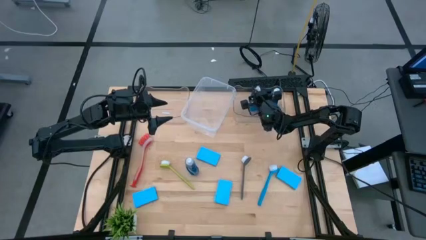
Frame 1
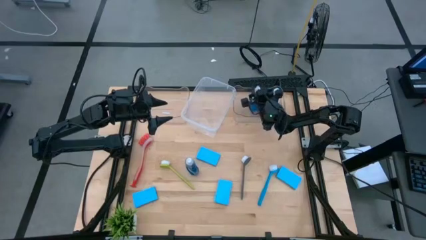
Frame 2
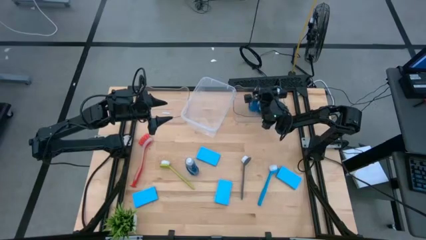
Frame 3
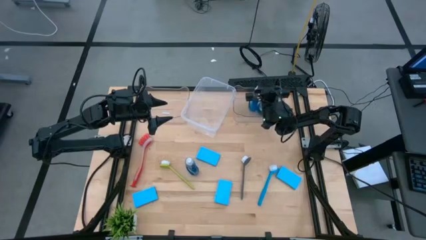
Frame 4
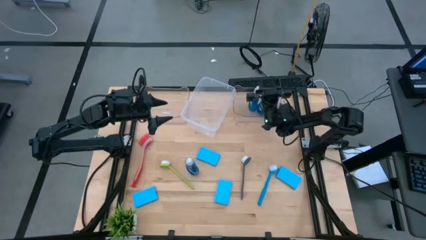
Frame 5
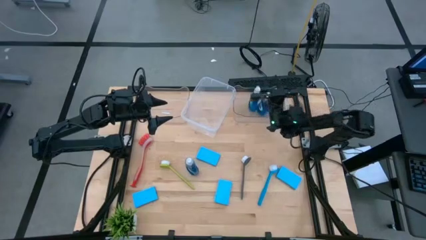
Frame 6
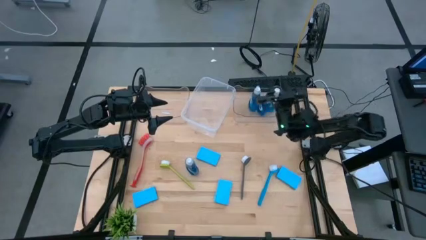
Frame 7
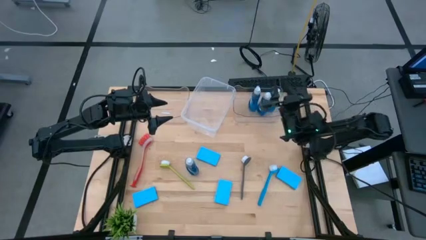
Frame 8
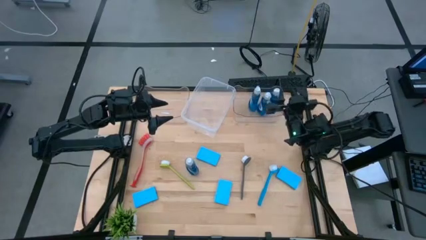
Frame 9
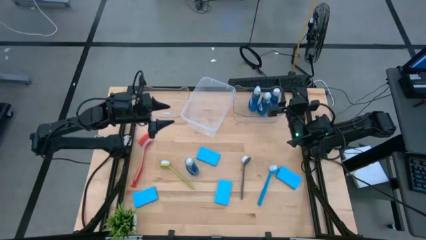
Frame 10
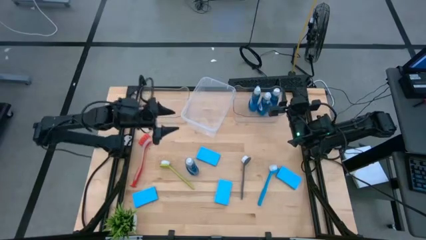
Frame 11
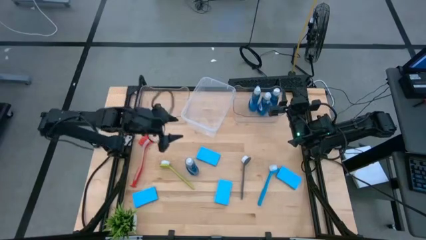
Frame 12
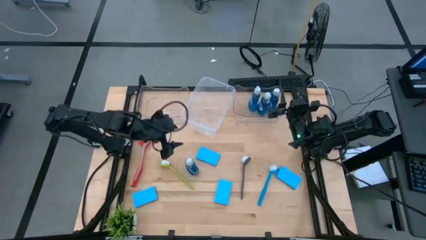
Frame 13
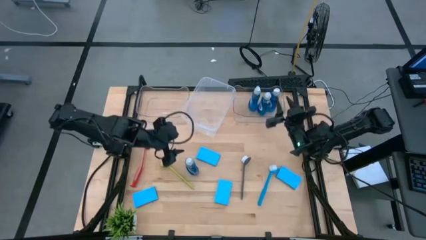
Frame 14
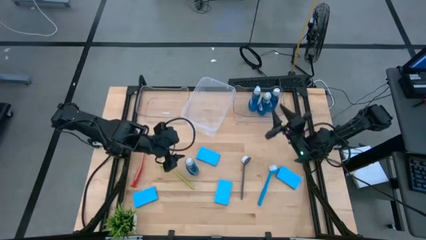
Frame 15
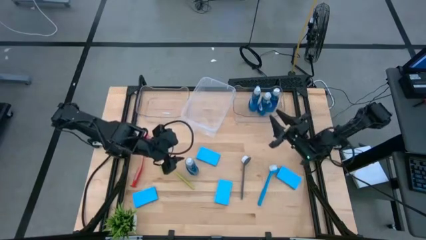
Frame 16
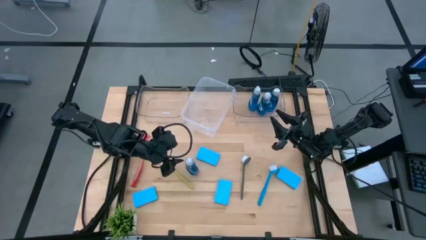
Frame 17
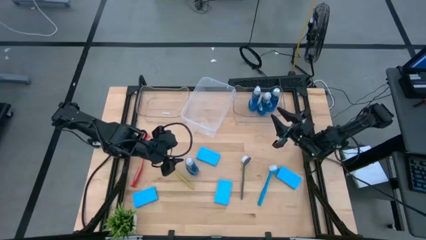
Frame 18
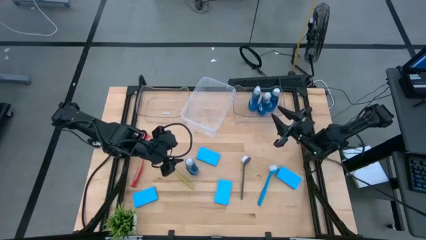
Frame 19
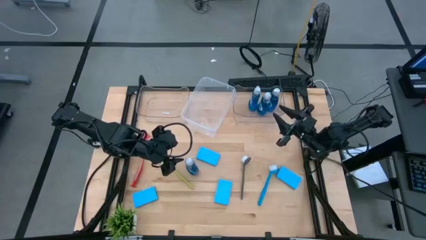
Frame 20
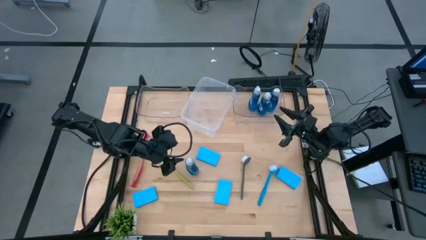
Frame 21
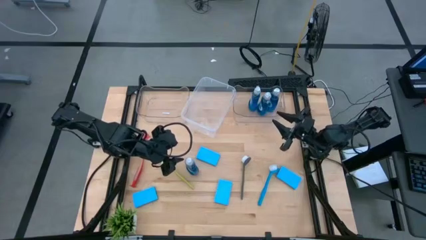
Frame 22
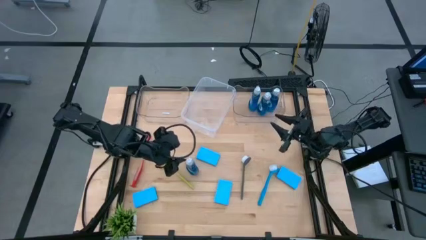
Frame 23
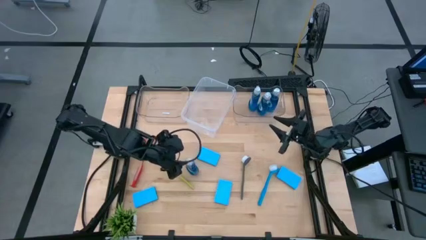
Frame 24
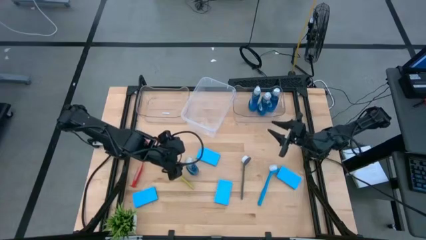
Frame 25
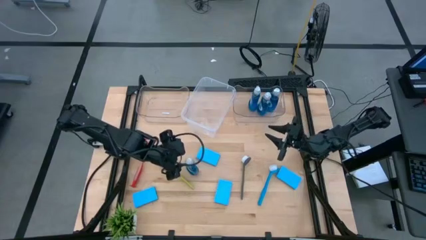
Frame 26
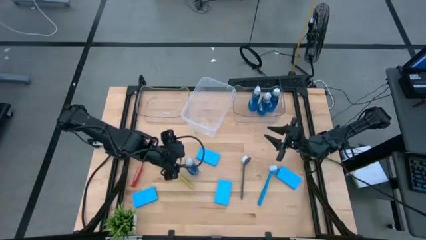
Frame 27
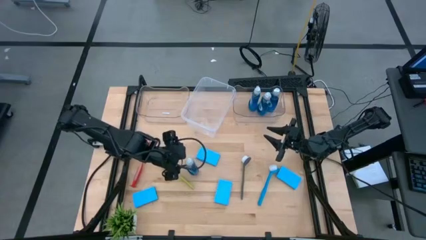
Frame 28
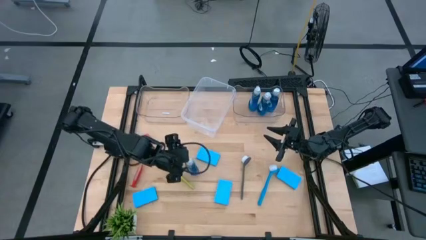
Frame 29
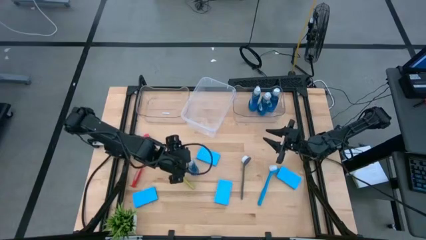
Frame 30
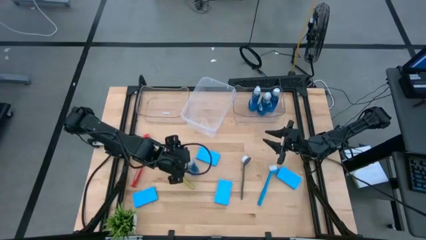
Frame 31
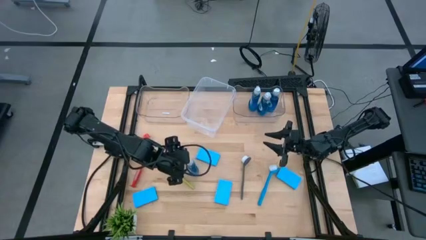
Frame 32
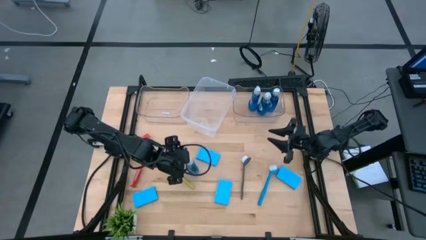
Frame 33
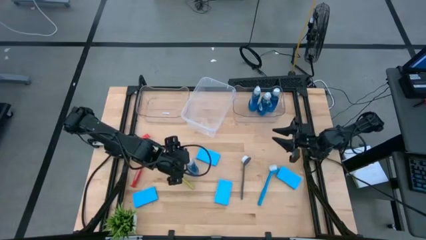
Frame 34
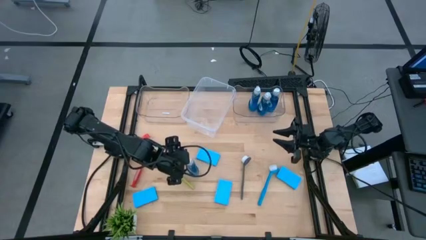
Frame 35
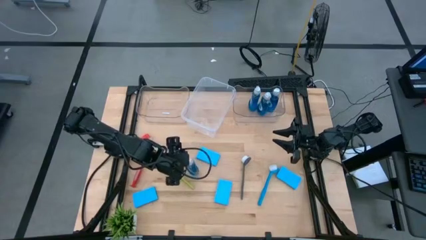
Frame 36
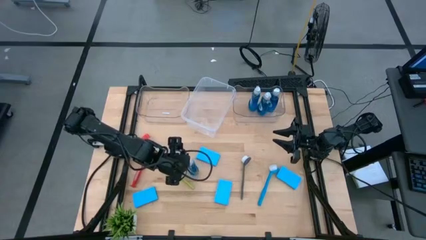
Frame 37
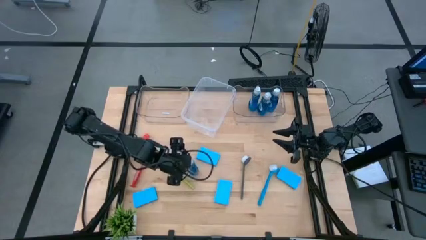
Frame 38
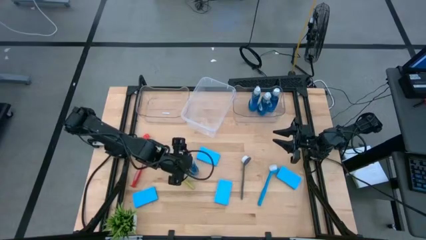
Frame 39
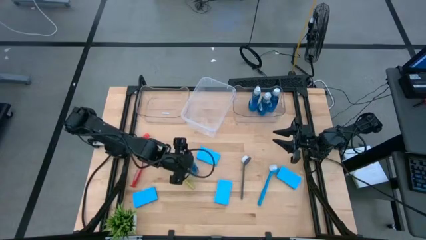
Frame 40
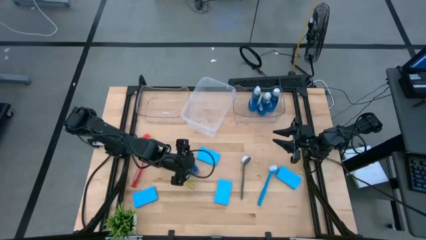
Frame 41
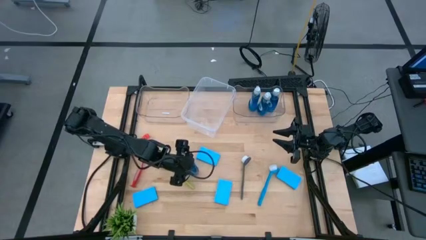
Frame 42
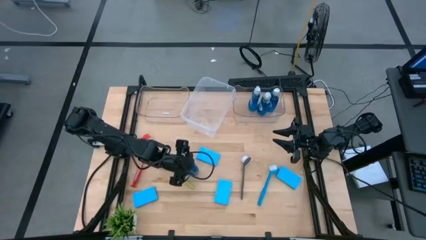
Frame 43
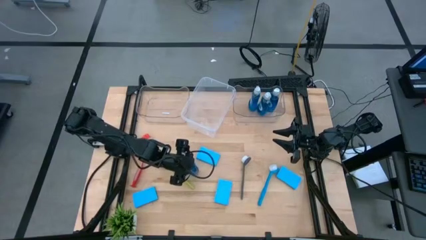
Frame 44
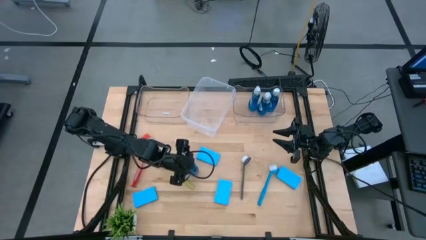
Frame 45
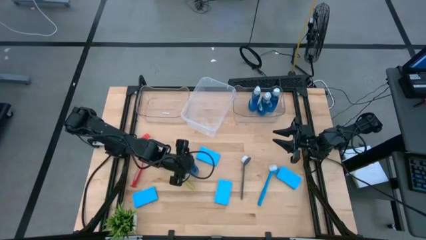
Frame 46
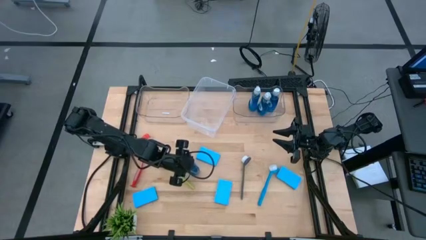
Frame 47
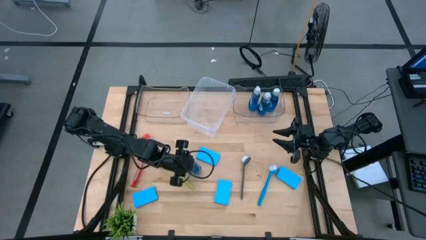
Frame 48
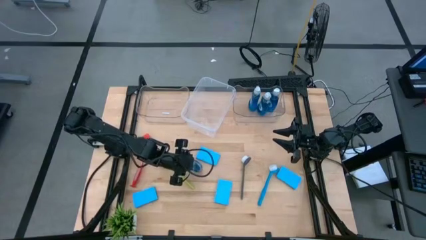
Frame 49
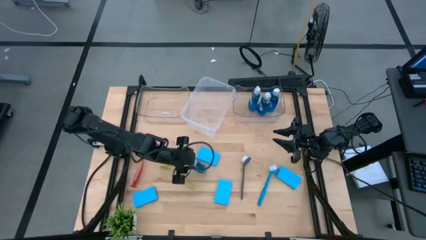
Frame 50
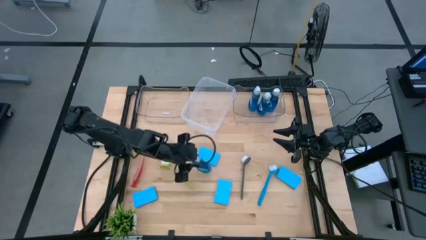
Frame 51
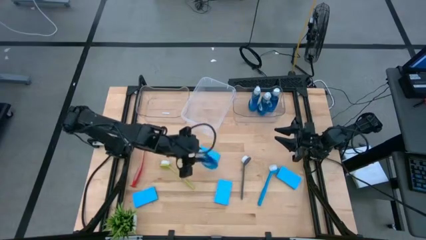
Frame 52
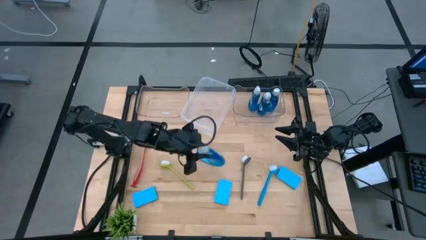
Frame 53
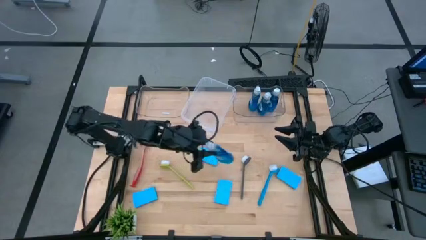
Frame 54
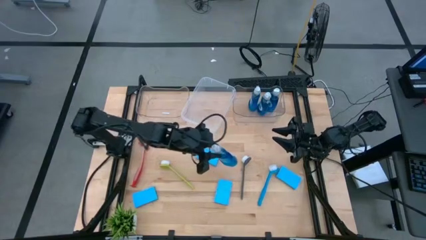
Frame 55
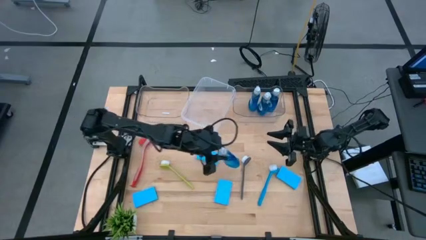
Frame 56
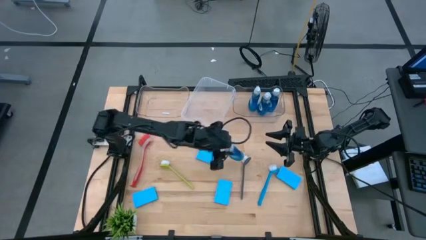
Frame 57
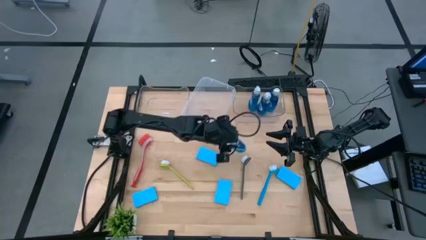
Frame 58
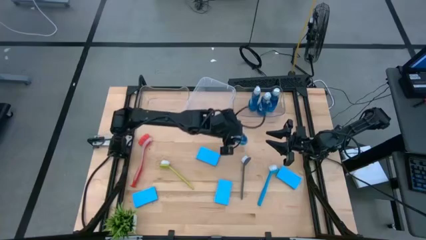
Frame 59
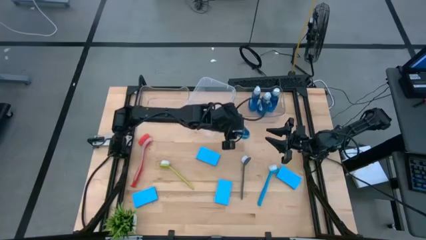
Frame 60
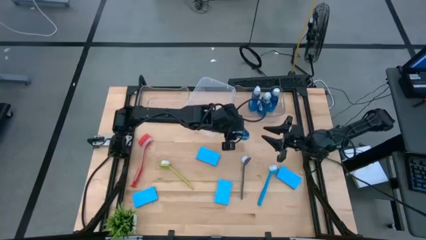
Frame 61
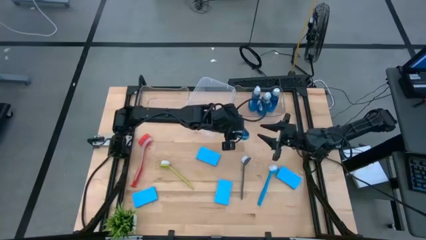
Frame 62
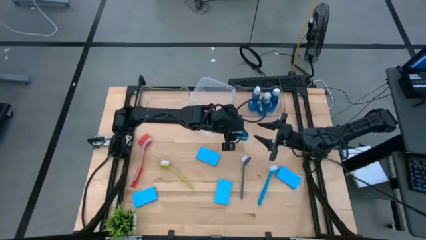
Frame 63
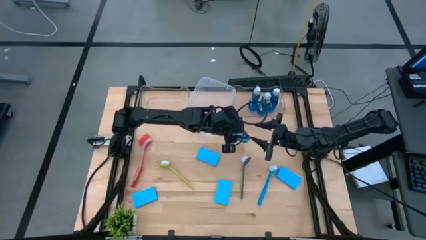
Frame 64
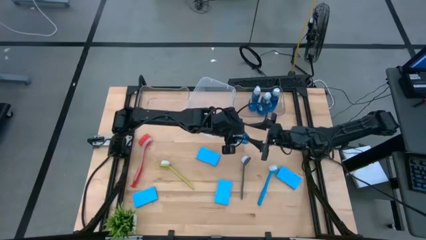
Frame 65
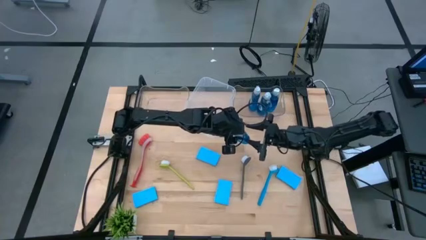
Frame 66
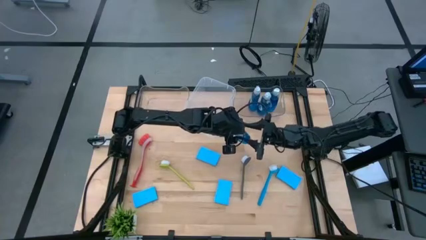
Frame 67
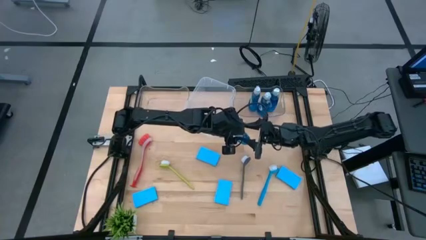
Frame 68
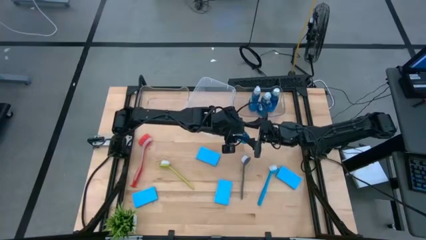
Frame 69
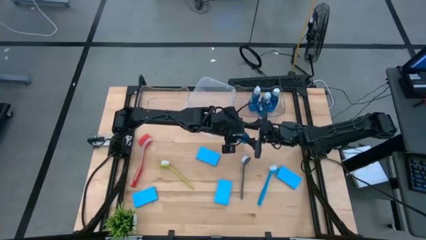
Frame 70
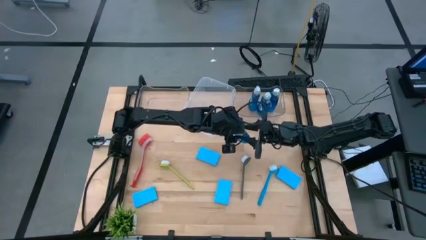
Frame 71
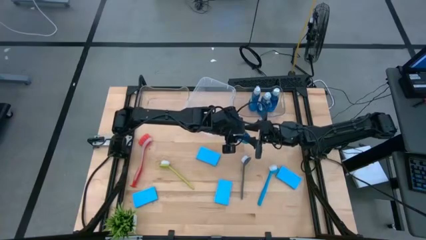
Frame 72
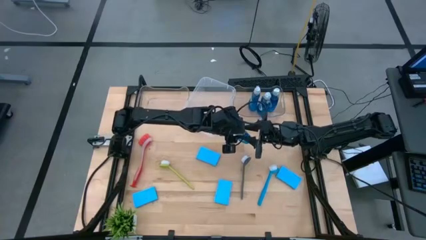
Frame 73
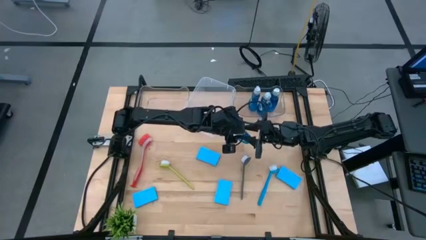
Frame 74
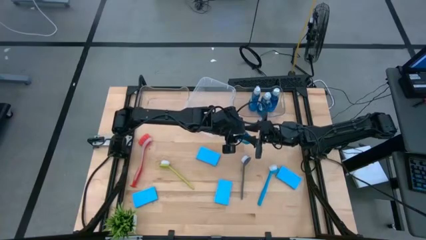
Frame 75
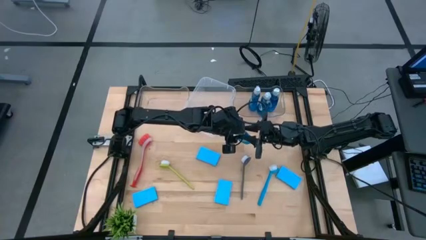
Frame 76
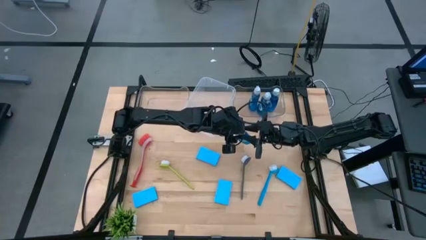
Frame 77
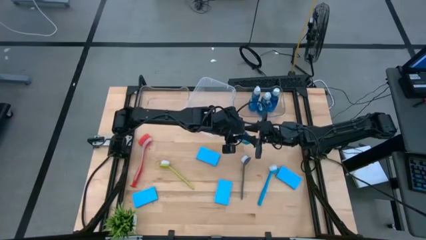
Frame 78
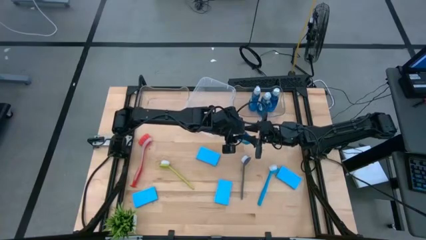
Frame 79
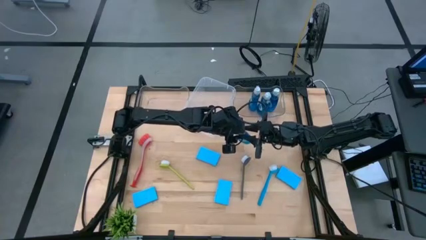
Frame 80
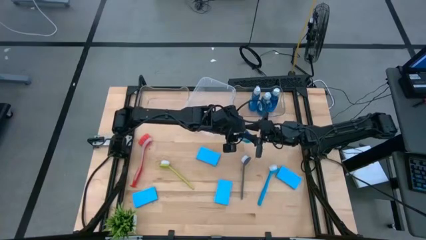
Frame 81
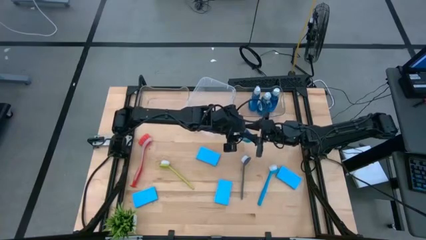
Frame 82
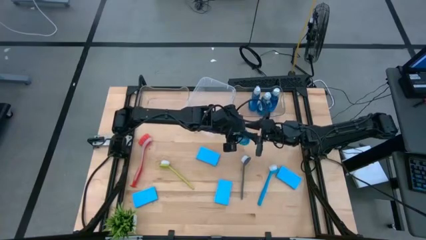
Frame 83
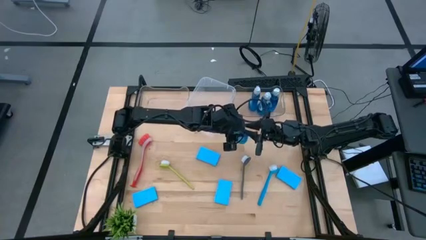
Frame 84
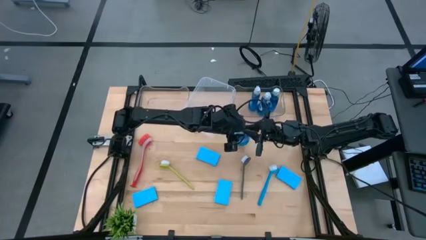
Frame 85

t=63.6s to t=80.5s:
Task: Pick & Place Kitchen Sink Supplies
Put the blue dish soap into the right transparent bin
